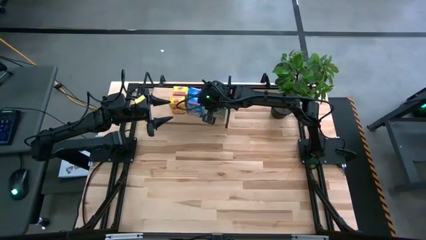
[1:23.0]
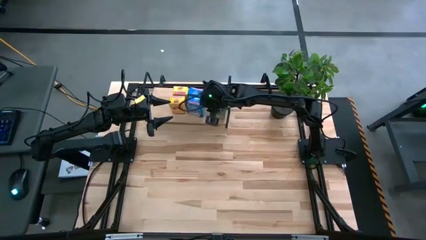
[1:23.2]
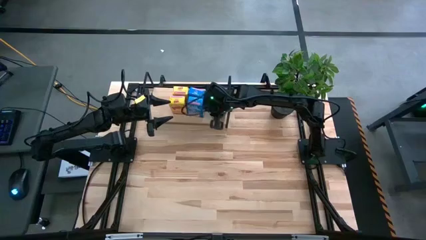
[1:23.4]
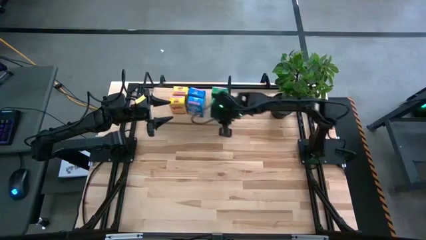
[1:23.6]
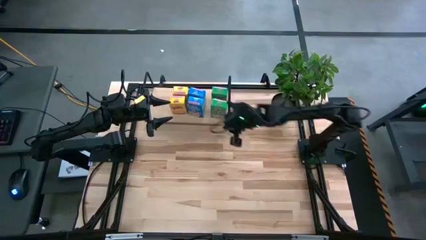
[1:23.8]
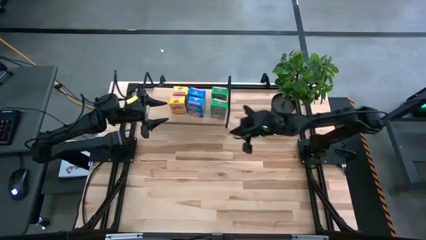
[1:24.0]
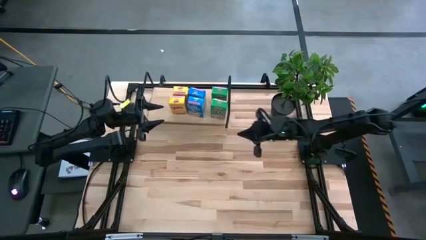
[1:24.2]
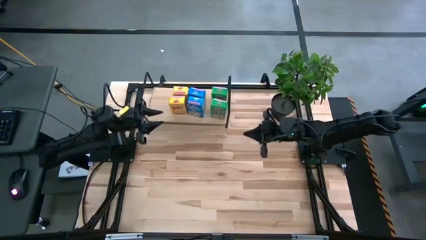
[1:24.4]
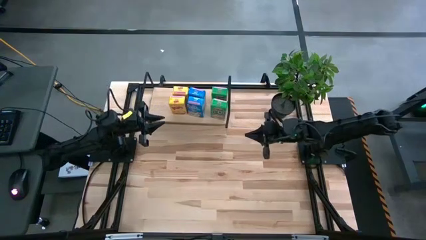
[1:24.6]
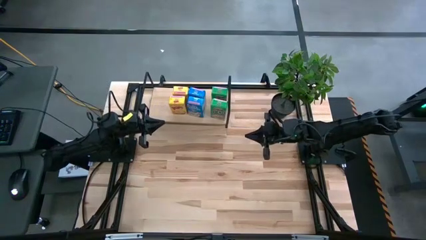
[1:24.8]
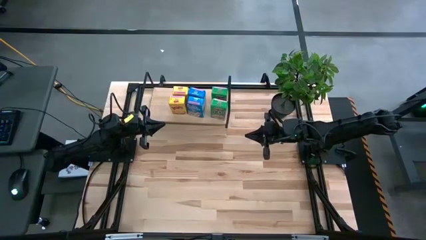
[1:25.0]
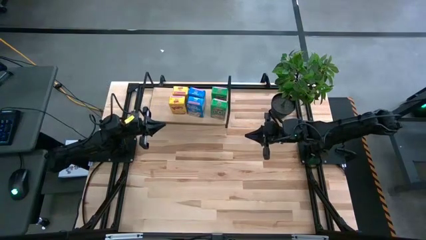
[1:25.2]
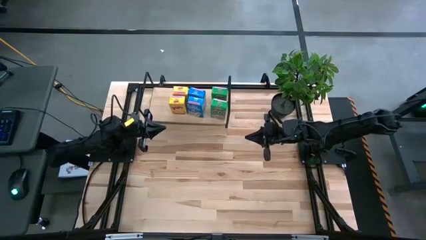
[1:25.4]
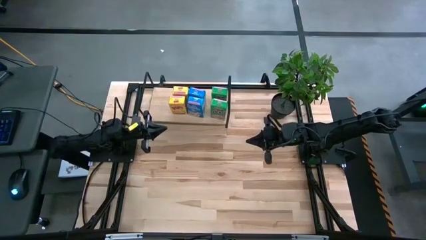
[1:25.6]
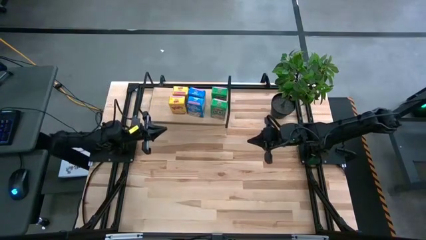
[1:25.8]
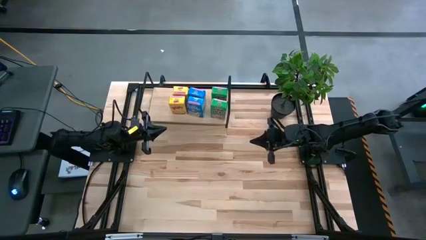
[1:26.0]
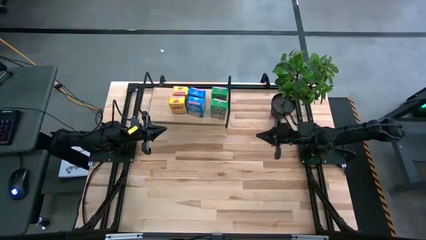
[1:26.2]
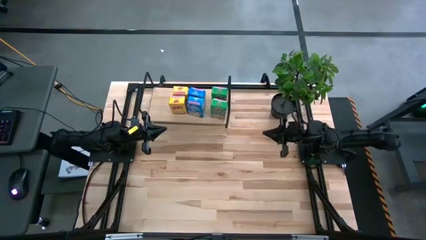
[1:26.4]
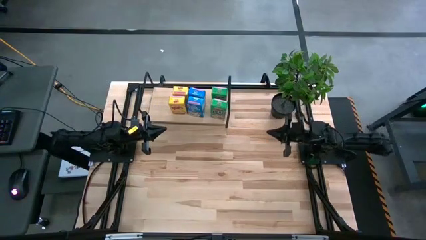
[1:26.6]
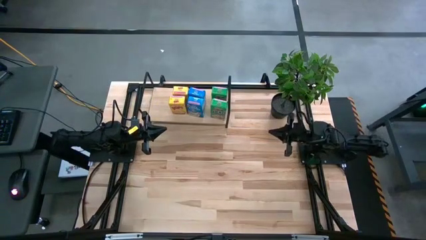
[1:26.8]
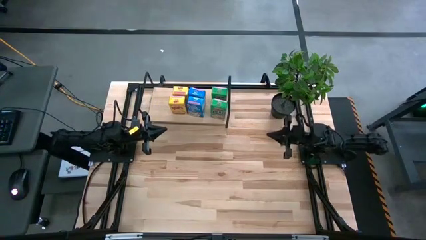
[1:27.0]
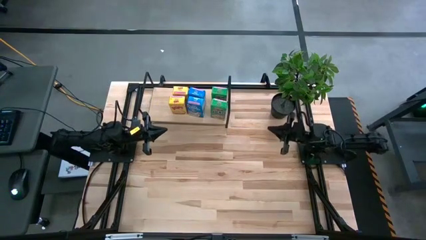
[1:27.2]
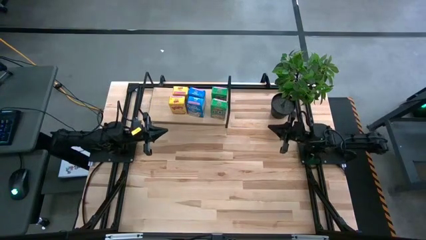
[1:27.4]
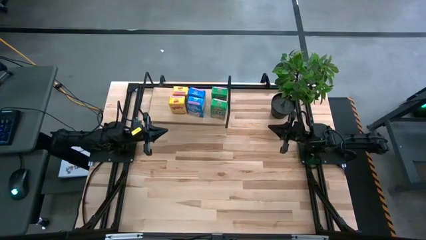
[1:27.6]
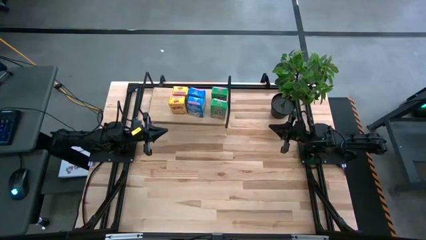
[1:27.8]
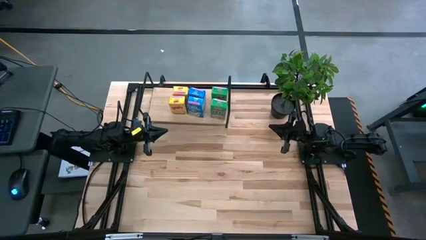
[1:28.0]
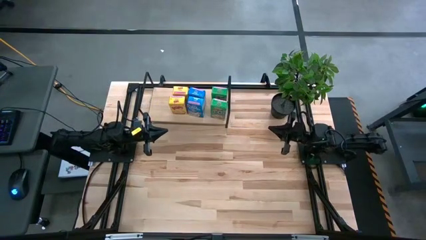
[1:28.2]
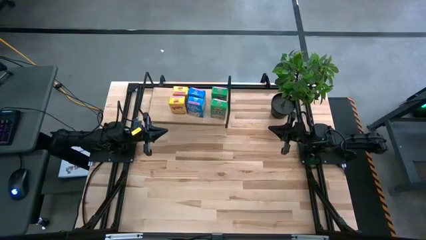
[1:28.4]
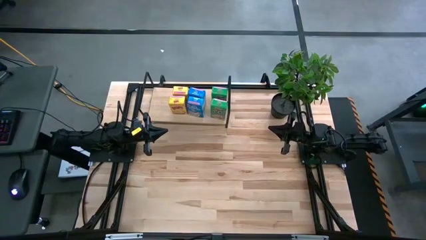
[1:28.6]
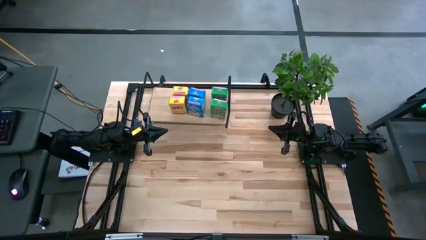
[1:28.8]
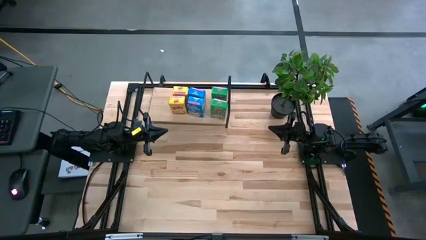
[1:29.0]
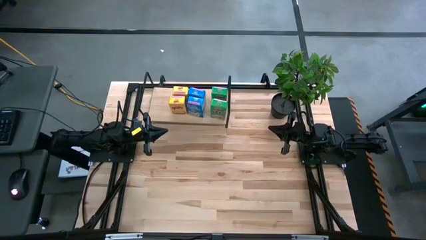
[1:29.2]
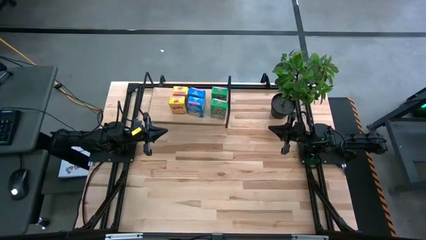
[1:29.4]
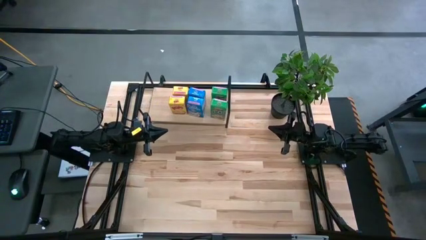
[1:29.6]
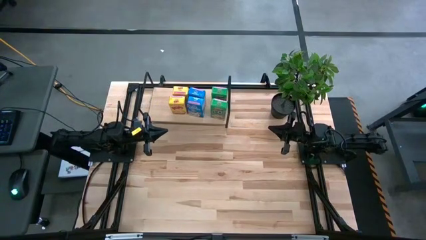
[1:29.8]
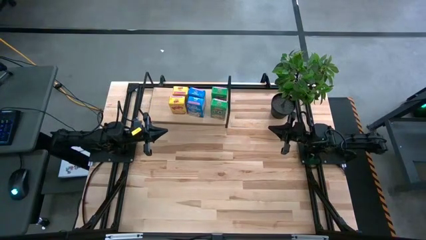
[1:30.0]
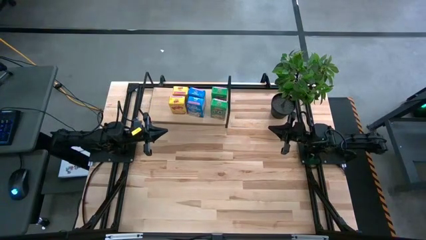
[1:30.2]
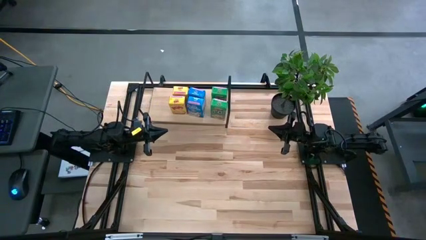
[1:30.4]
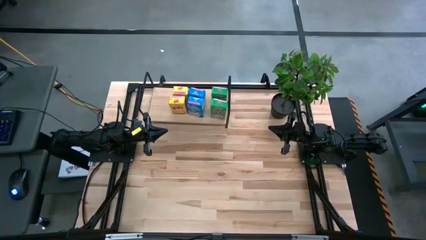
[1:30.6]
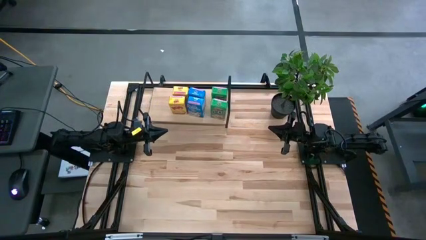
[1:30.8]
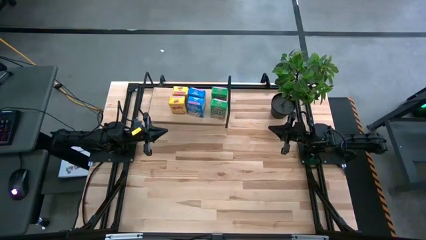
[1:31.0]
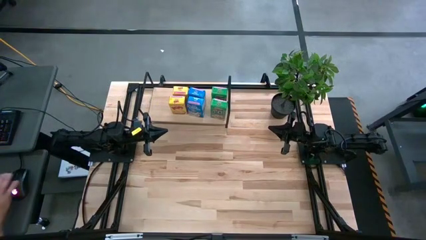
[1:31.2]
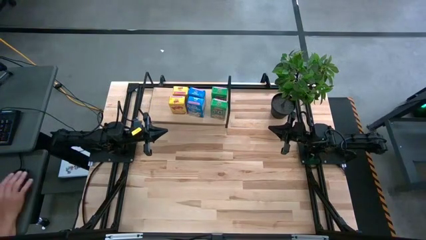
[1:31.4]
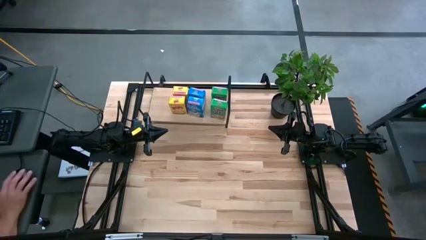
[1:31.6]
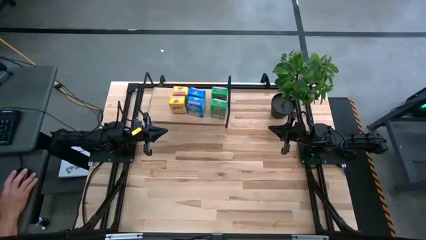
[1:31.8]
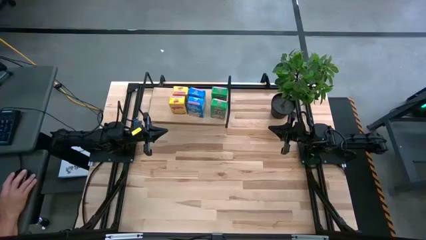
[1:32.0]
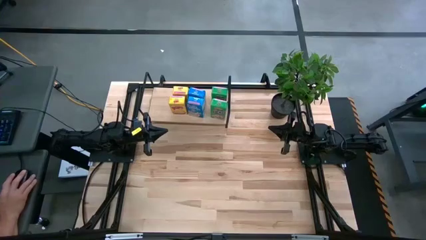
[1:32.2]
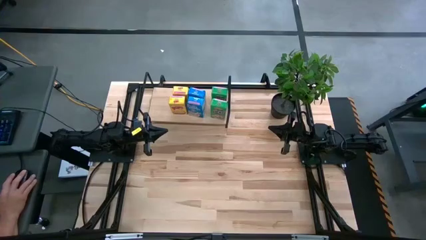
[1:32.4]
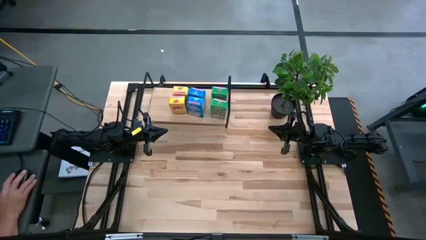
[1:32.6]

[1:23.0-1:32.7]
Task: Stack cereal on shelf
Return to Home Position

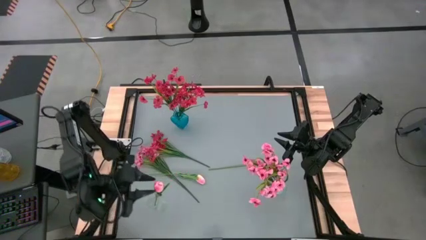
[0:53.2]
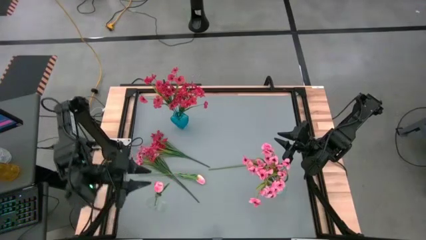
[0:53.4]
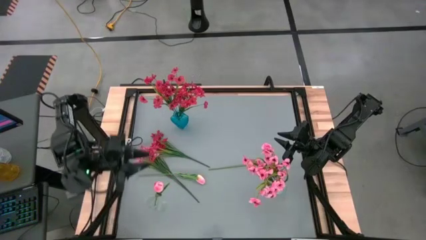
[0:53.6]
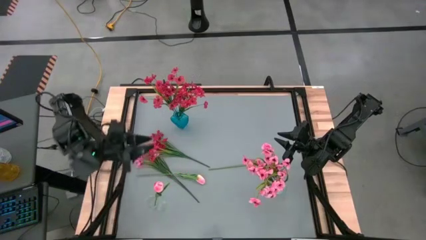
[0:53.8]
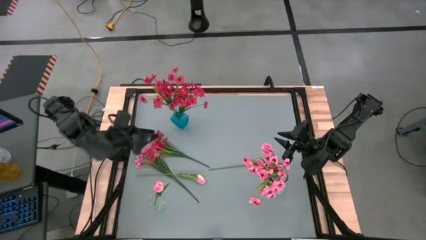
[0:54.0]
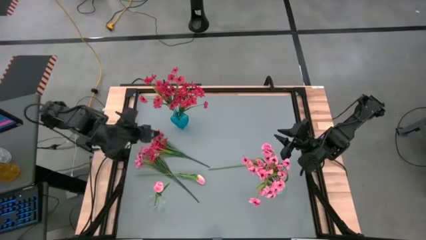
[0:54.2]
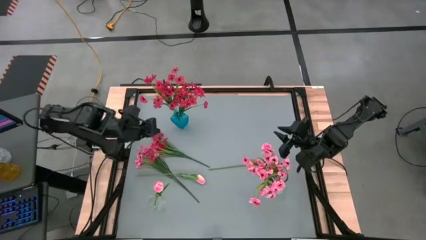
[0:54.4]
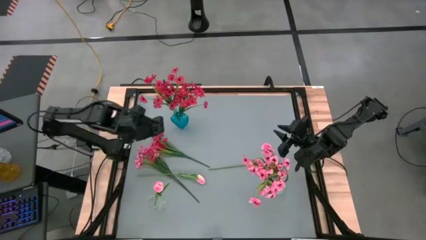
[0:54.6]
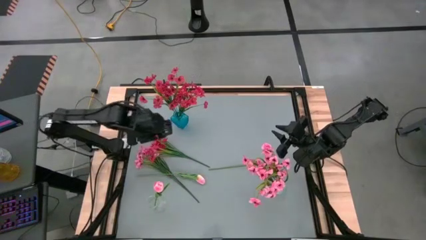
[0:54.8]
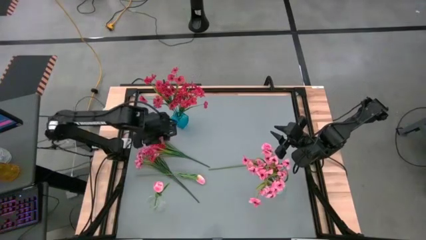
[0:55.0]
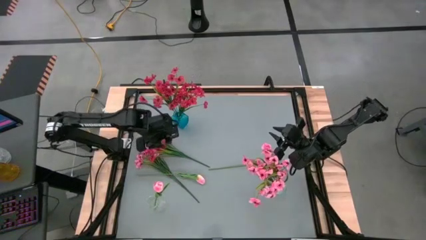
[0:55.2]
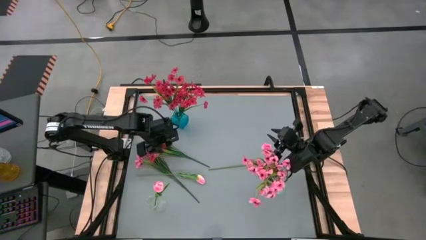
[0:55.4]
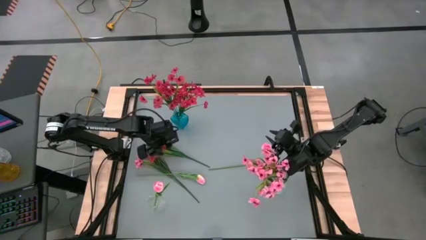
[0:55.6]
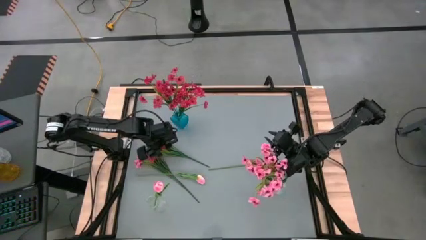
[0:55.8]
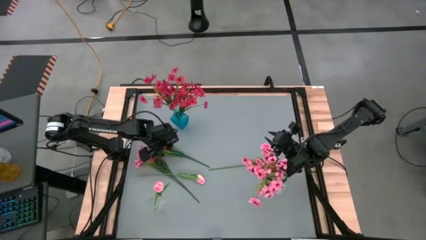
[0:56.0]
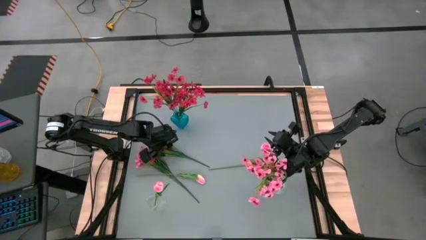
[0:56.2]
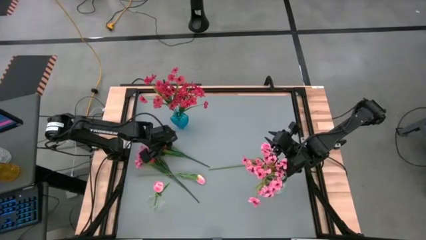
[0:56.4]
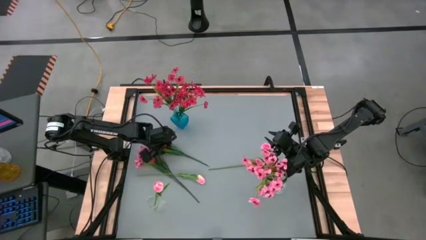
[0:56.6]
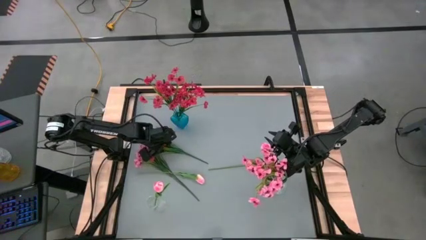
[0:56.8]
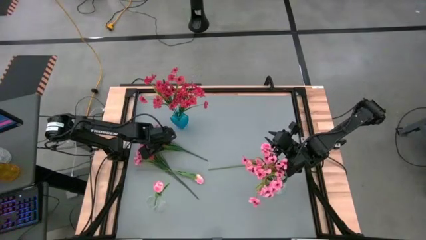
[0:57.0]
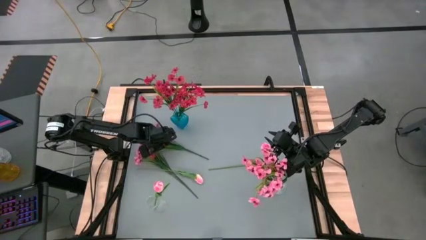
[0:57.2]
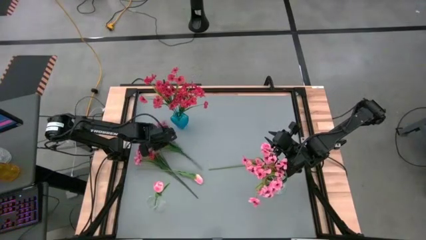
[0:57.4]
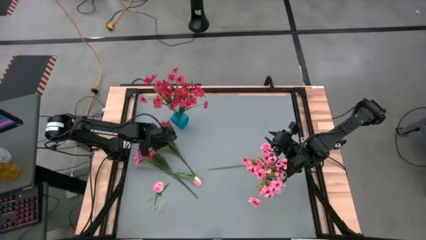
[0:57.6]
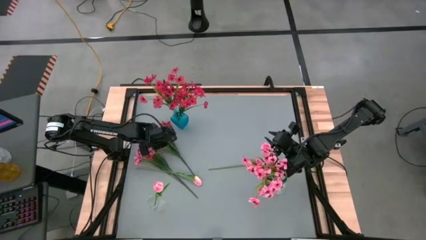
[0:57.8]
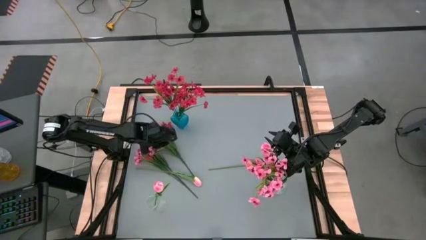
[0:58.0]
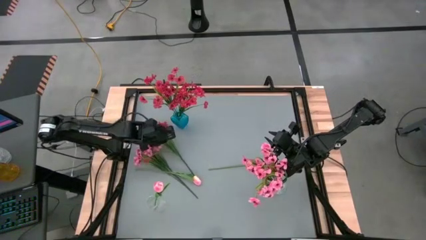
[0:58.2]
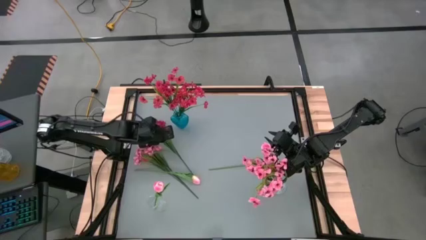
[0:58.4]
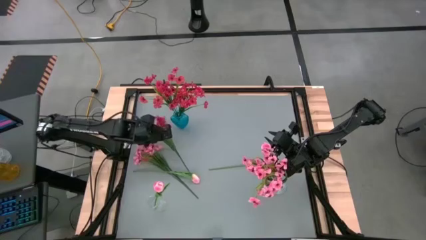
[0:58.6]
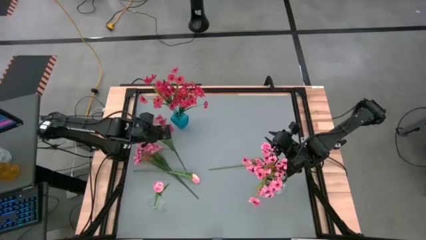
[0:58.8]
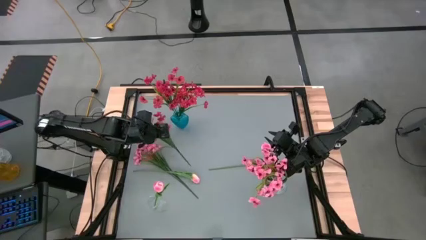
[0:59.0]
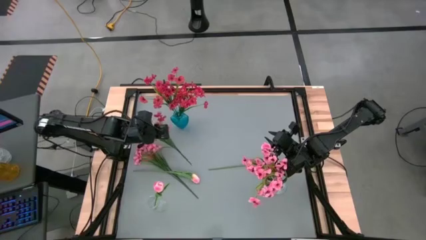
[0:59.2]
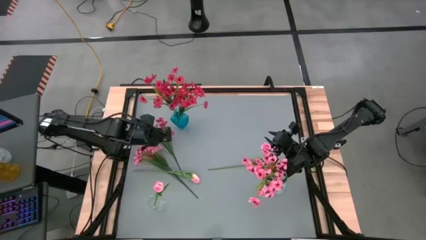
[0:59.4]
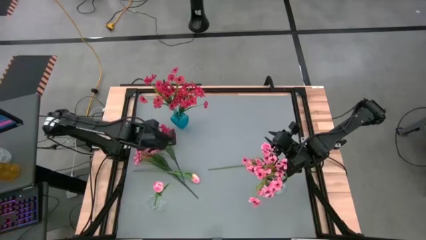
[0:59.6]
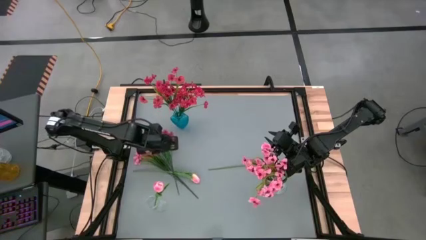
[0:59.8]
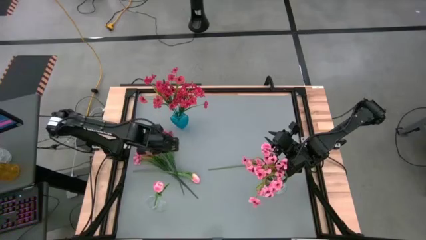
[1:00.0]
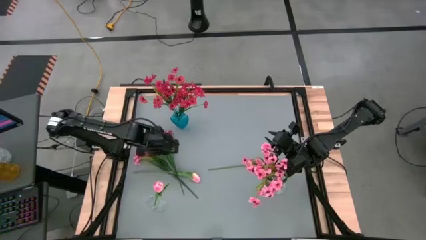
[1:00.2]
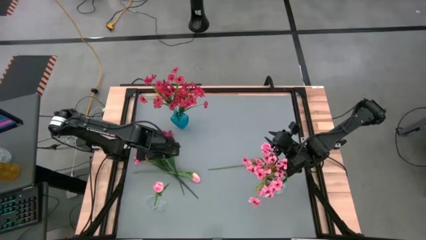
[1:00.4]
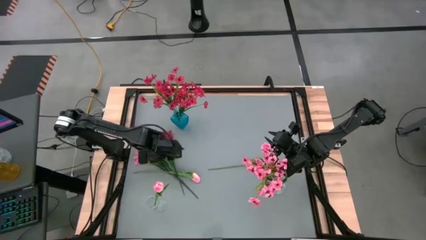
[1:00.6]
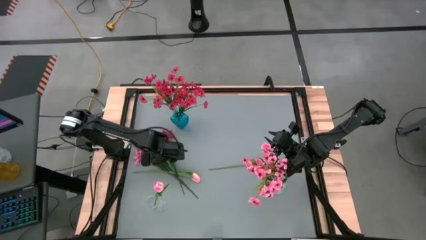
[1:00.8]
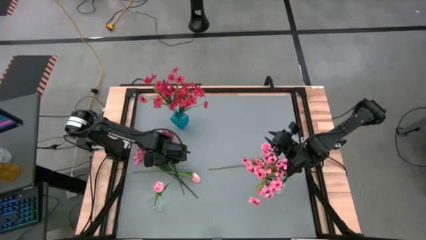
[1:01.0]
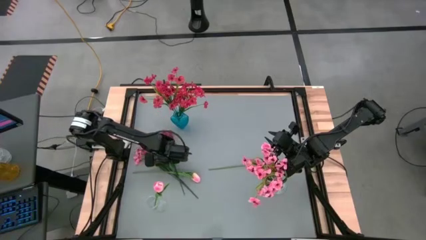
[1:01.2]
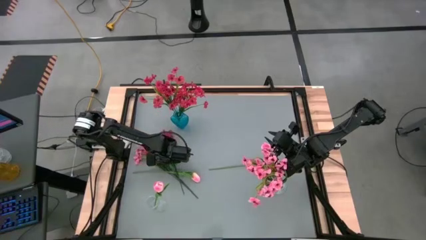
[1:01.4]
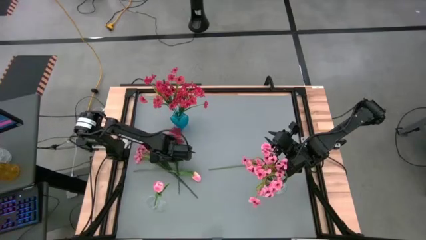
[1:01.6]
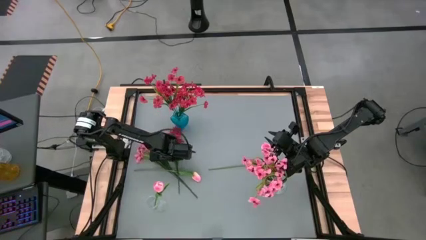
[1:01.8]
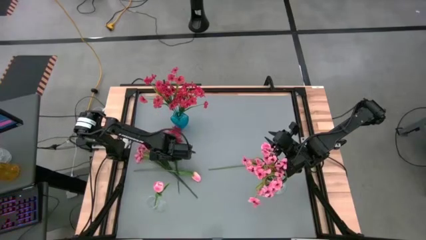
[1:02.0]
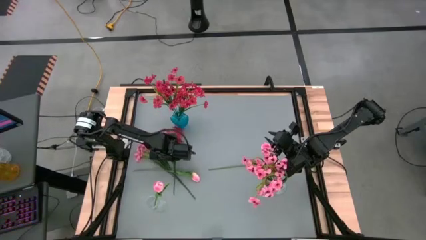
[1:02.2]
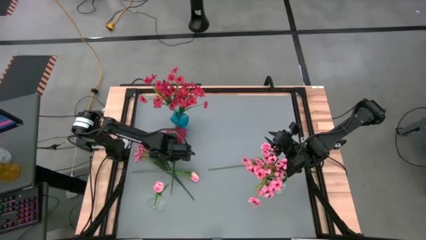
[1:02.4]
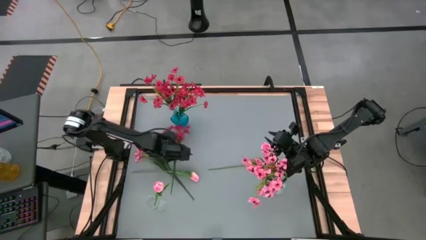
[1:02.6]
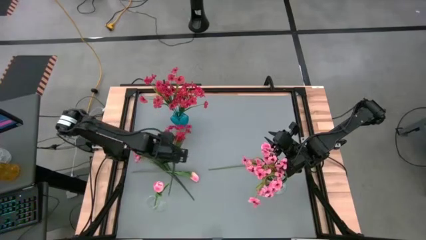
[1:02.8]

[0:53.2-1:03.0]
Task: Sort flowers into vase by color
Put the red flowers into the blue vase
